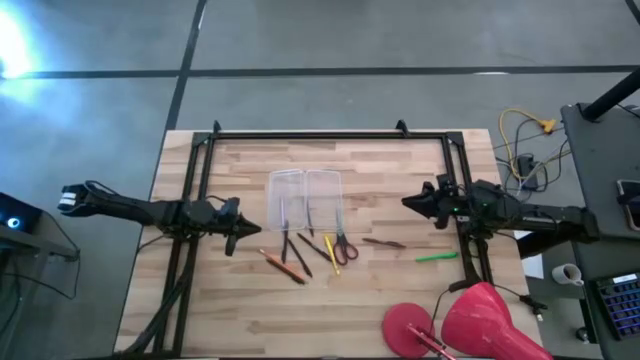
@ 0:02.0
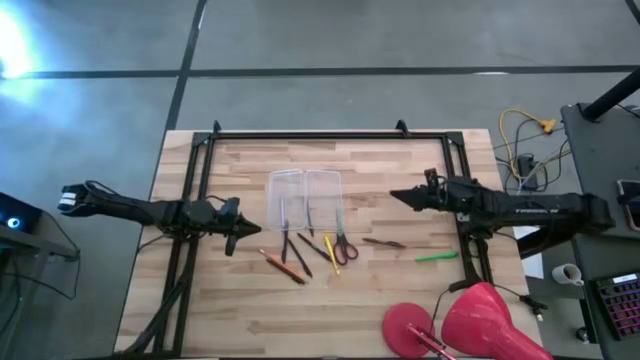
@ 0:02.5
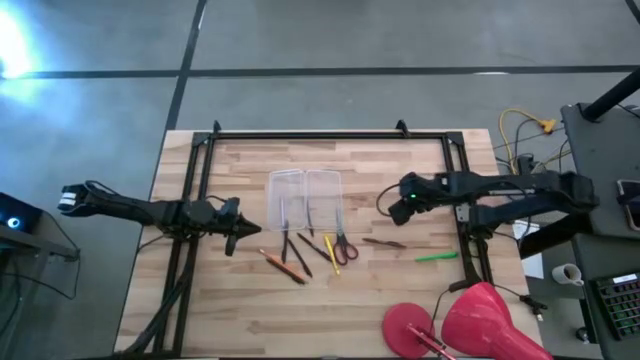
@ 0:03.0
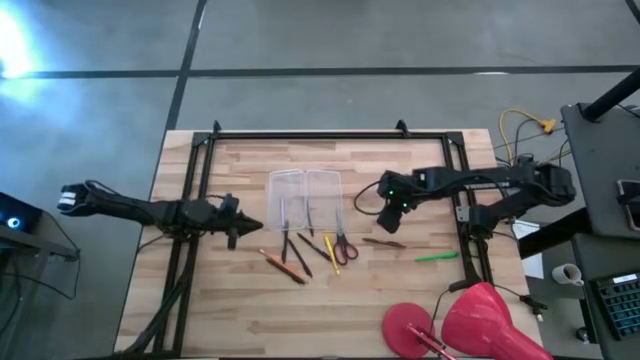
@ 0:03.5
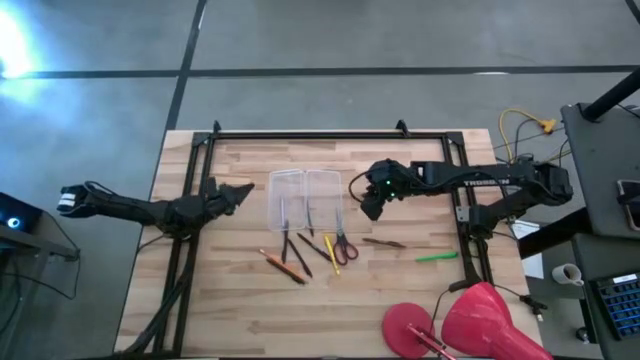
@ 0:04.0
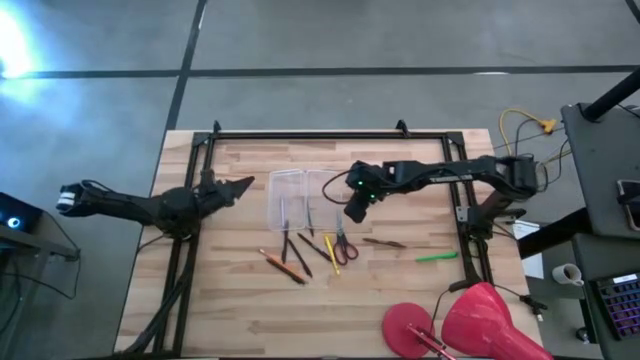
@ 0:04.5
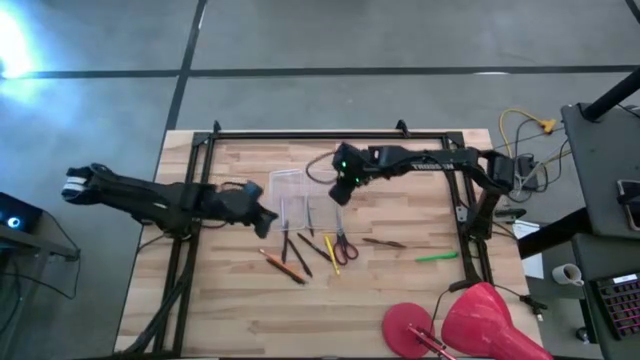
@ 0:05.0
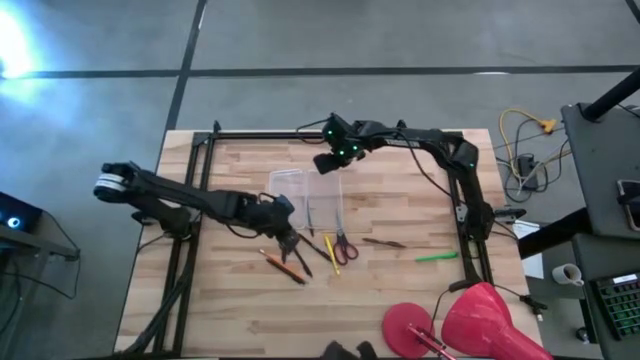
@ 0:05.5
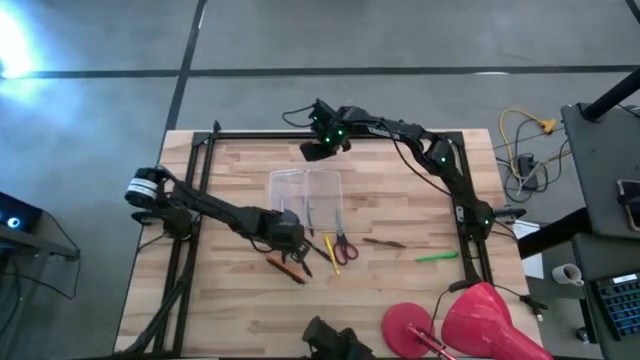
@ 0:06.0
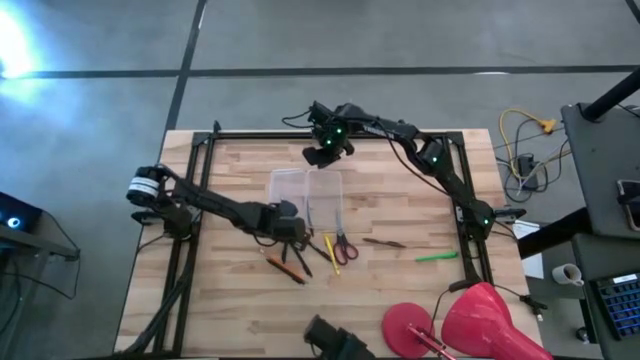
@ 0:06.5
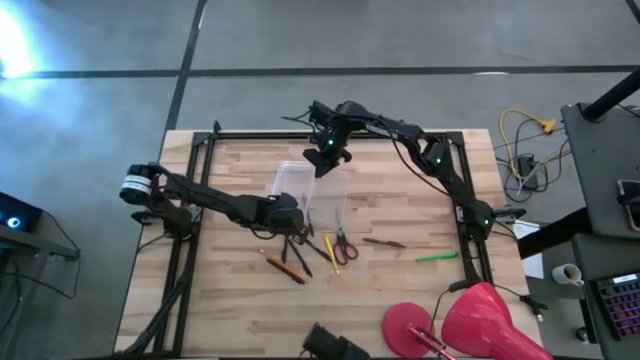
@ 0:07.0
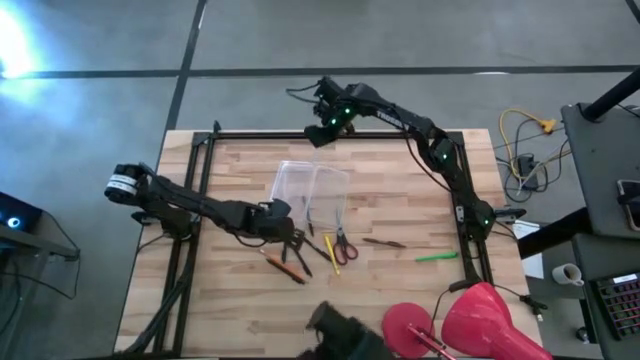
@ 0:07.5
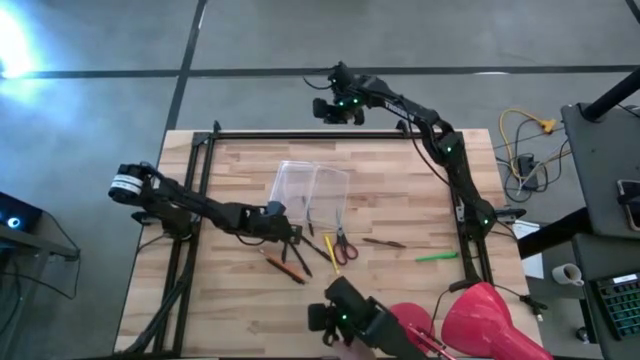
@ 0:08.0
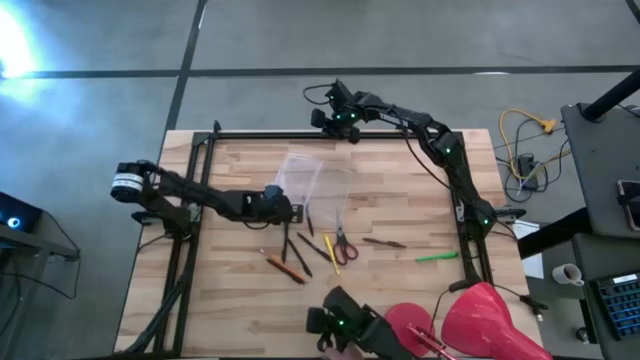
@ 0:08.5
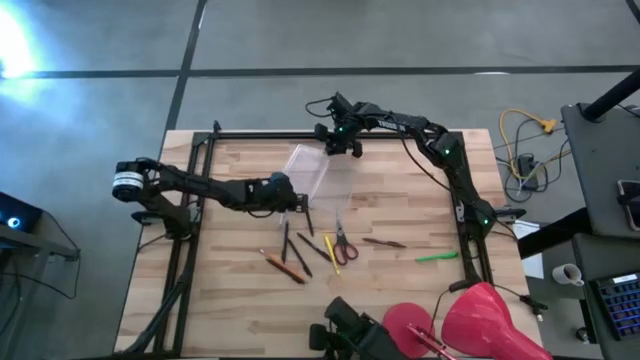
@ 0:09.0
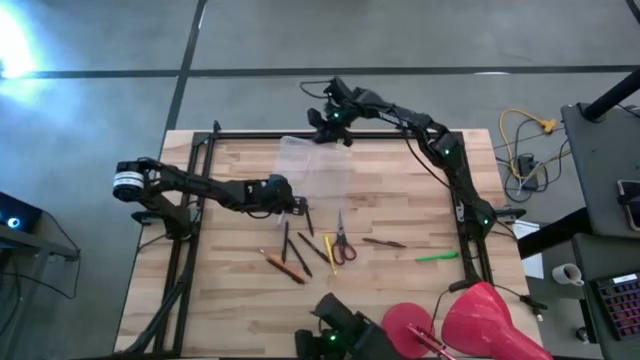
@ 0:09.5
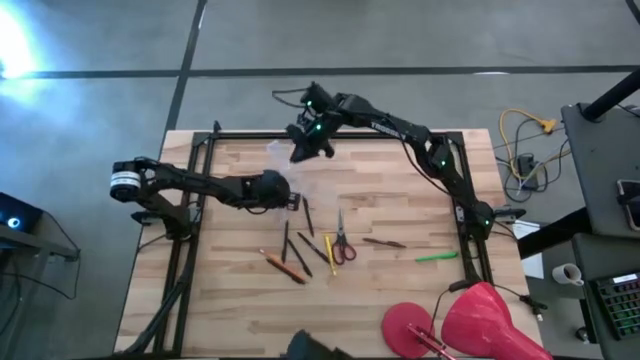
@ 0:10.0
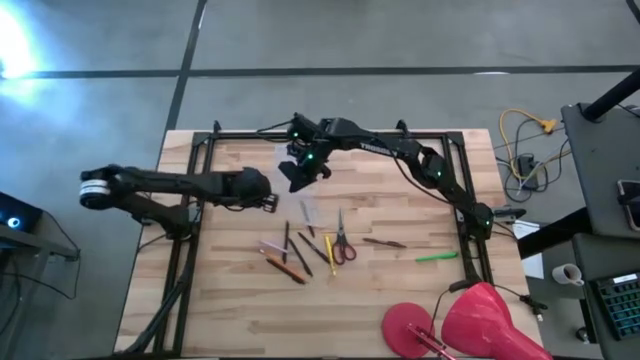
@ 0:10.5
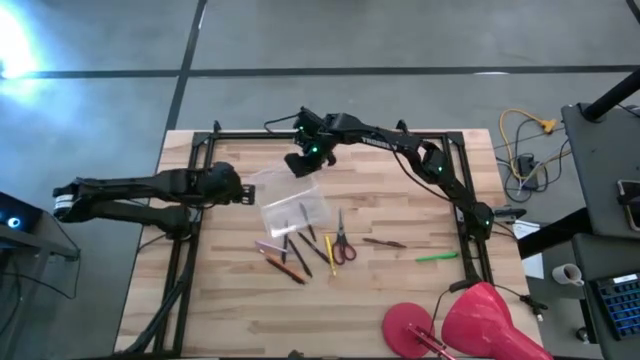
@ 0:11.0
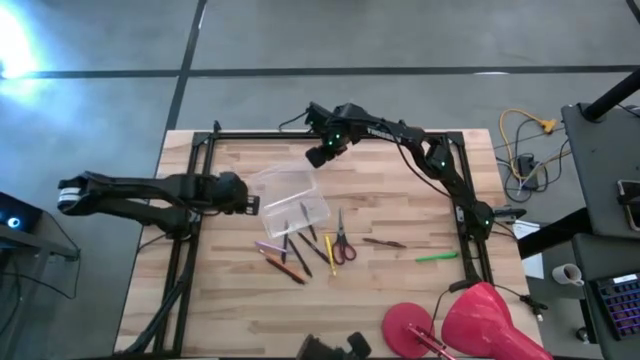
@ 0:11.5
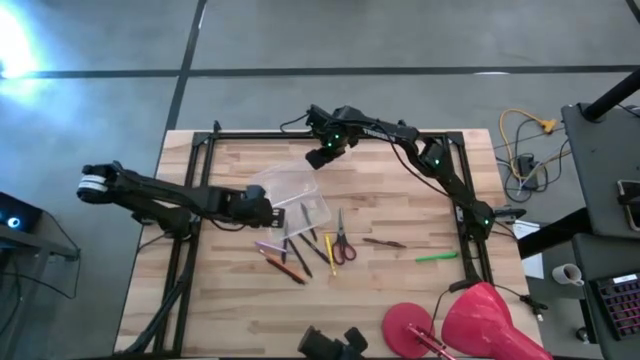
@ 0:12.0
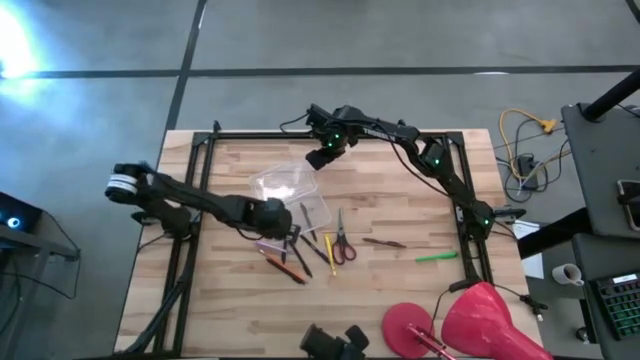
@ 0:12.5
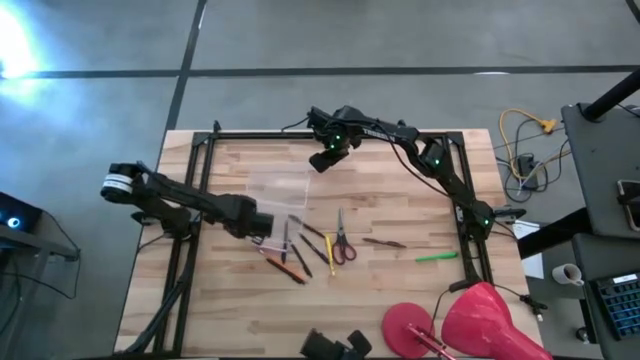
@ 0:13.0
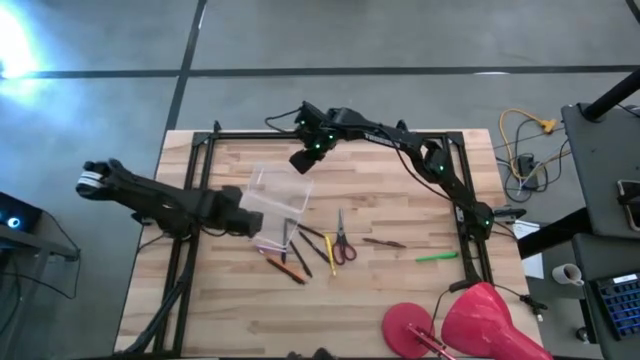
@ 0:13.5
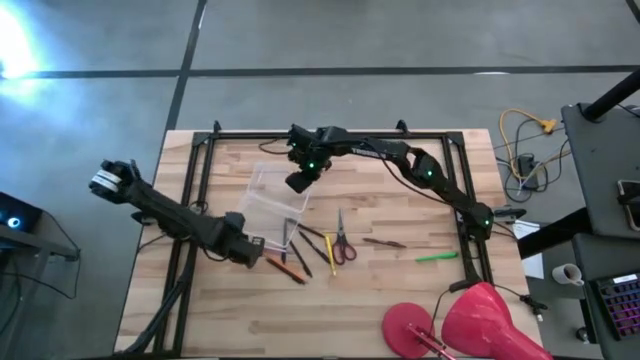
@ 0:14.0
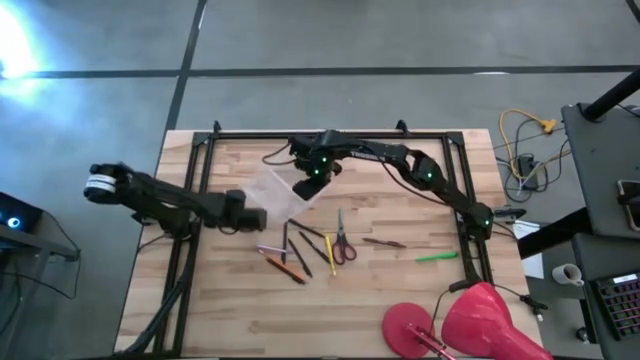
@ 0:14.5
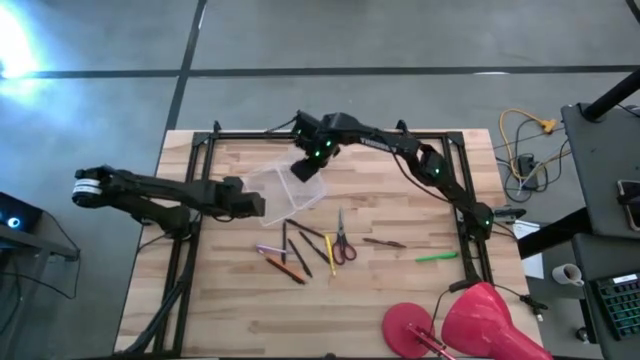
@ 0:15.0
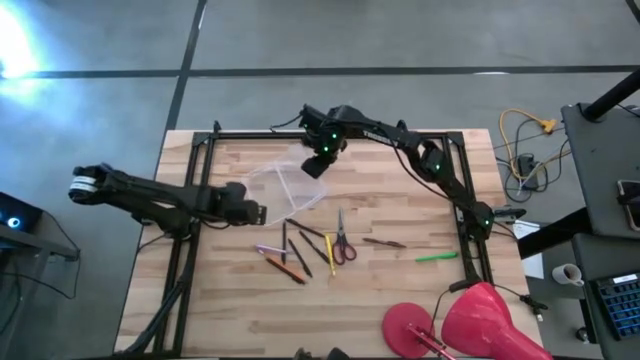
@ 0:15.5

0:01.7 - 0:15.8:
Task: Pick & place school supplies into a supply box
Prepare the transparent supply box

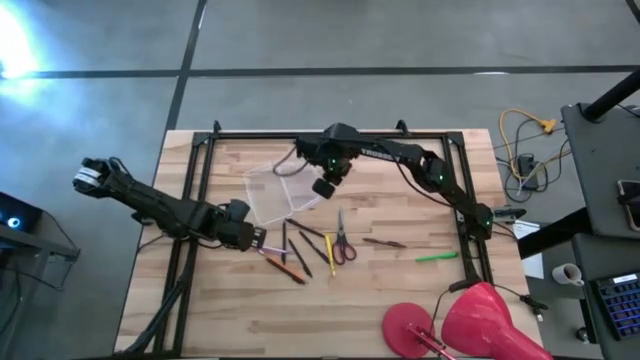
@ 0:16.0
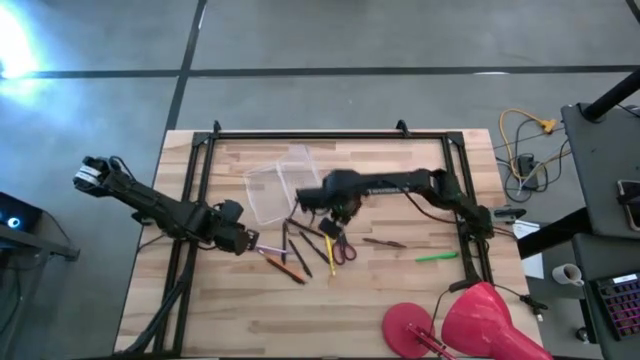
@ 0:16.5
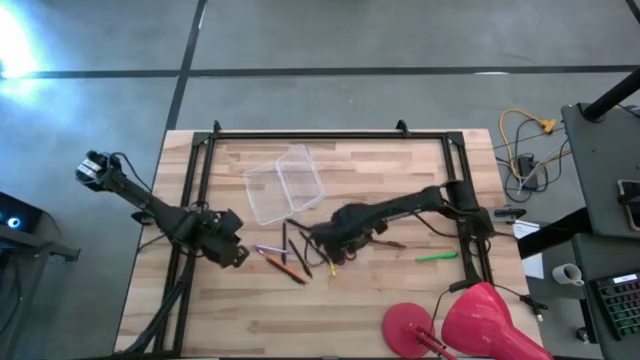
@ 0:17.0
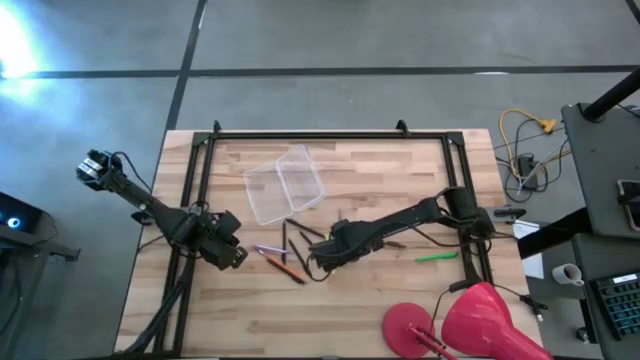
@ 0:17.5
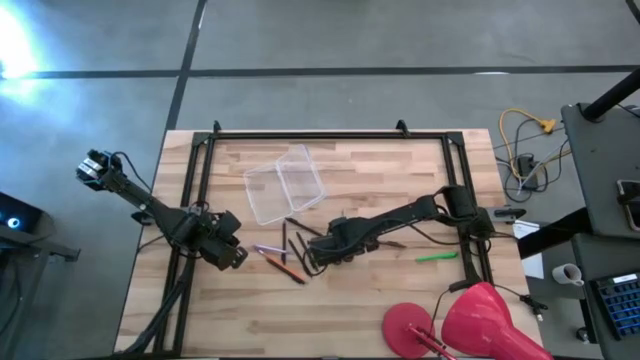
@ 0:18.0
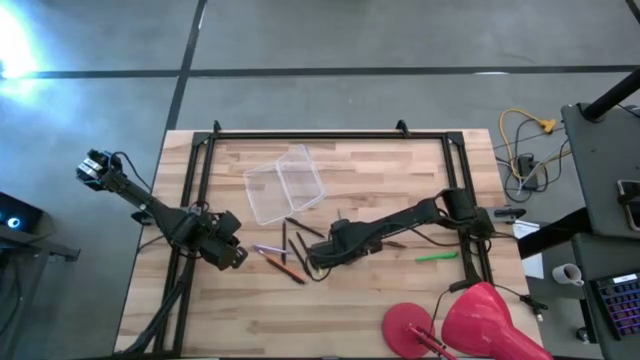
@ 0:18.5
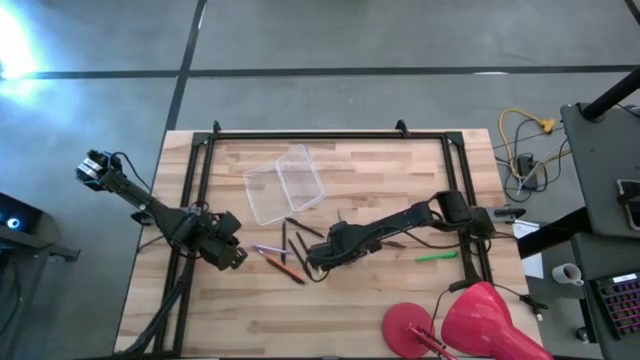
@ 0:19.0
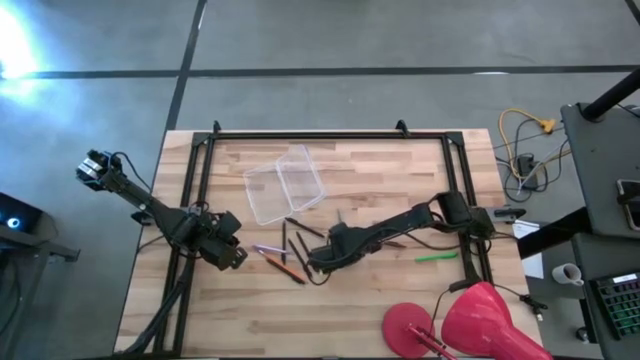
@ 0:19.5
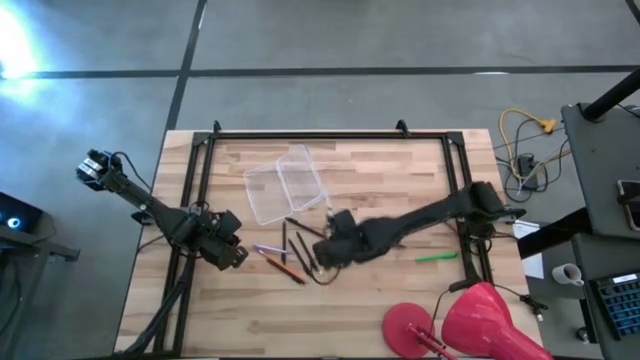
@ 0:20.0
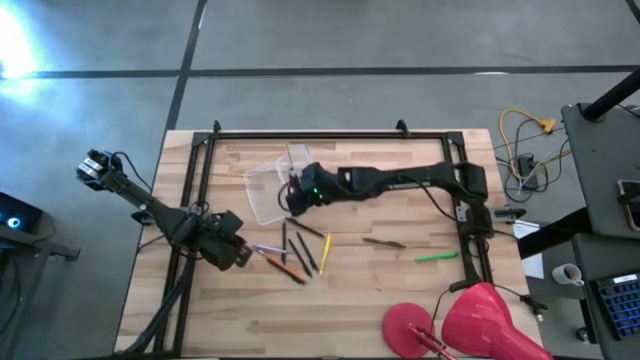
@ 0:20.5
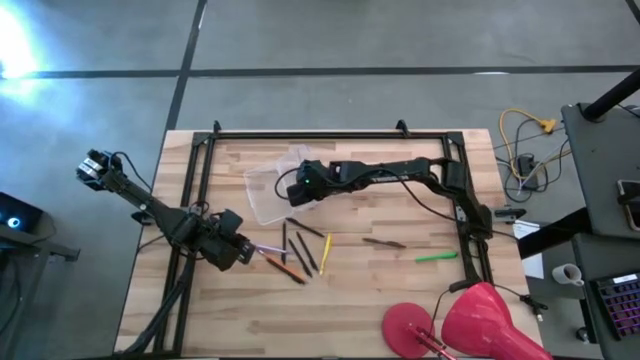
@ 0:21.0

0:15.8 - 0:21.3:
Put the scissor into the transparent supply box

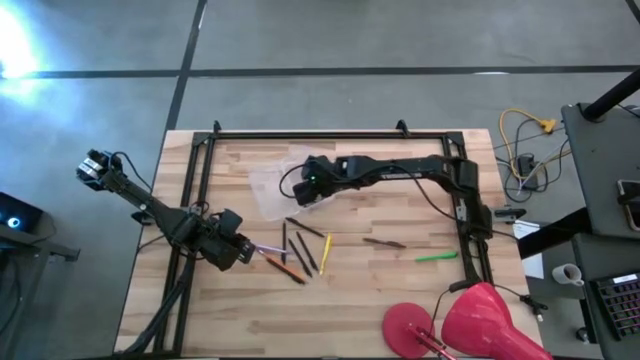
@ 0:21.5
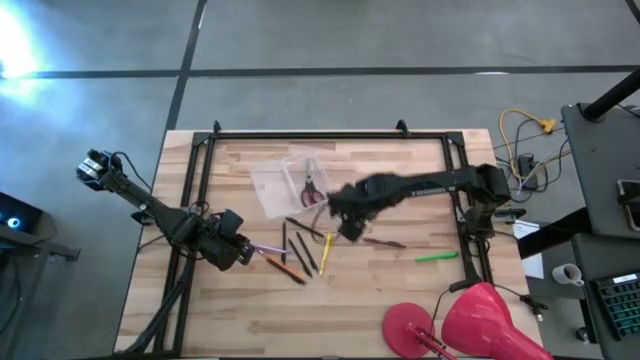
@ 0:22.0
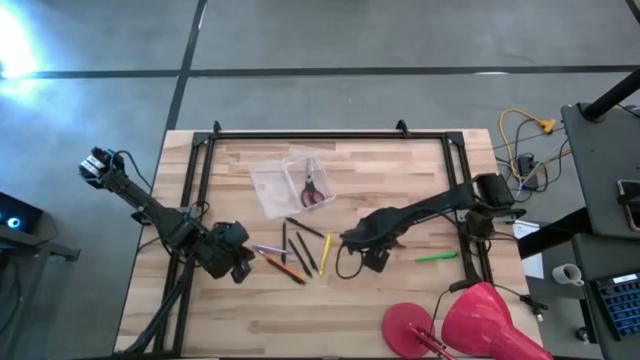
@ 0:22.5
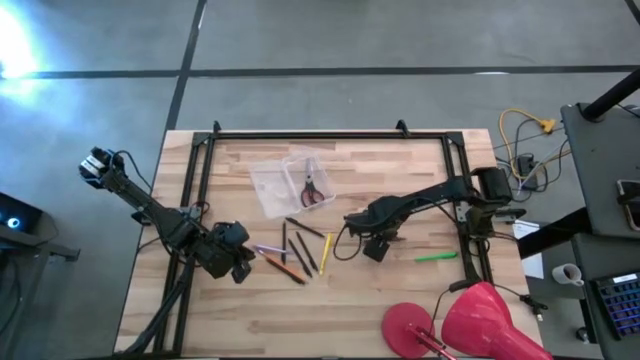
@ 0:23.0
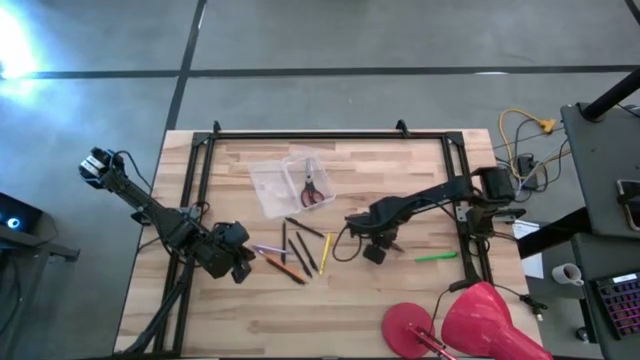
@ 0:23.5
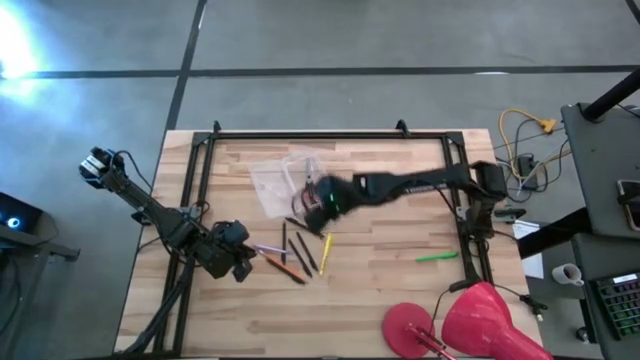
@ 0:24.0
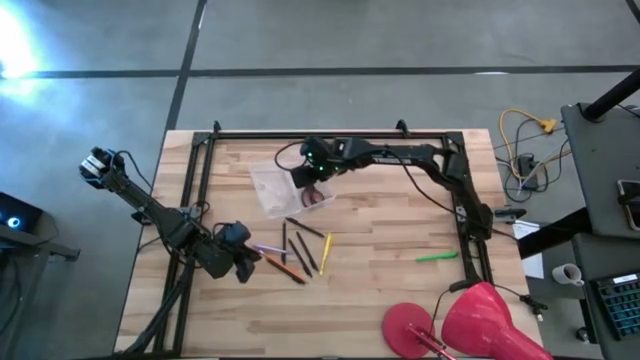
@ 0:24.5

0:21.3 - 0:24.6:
Put the brown pen into the transparent supply box
